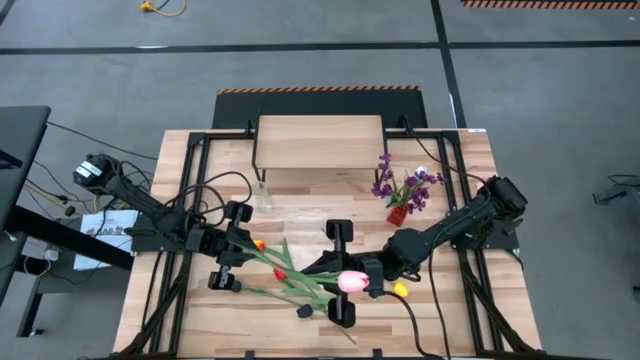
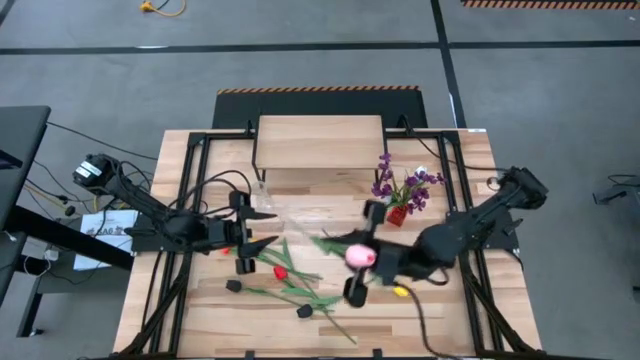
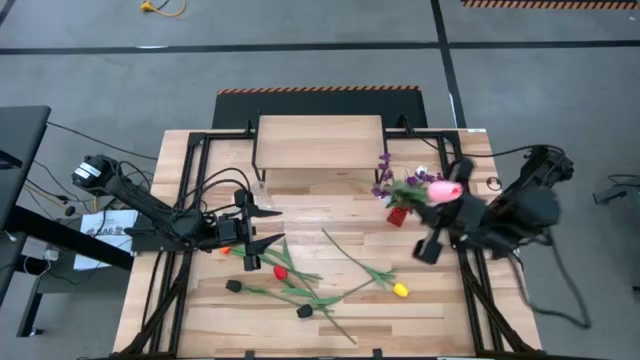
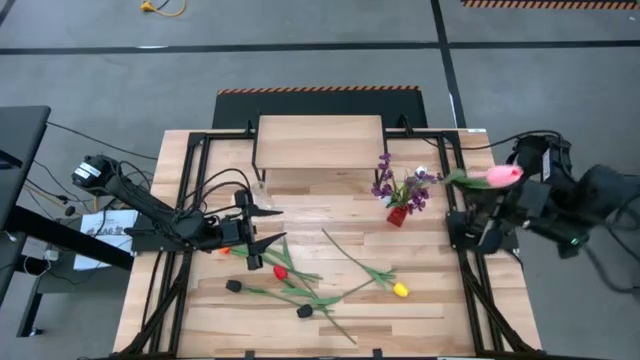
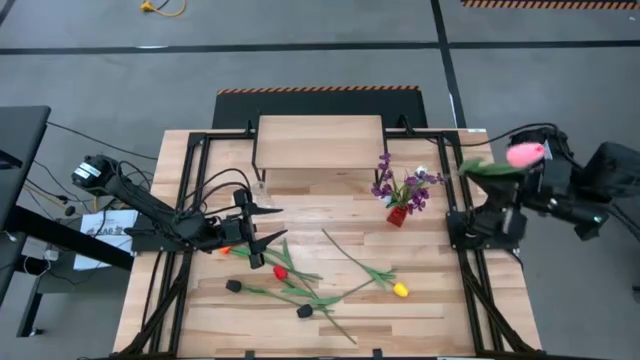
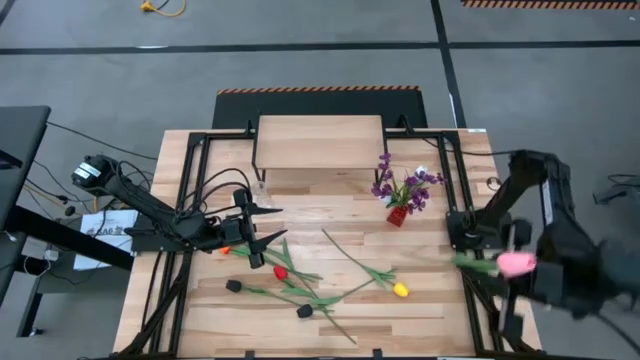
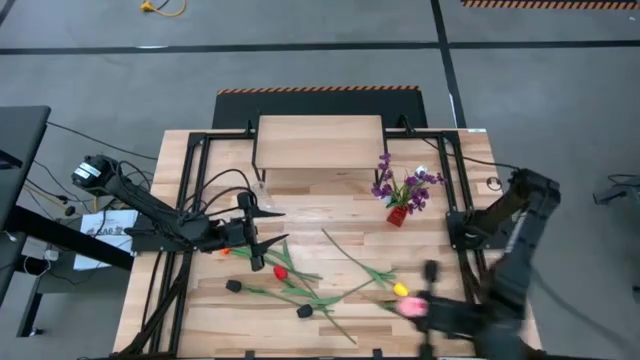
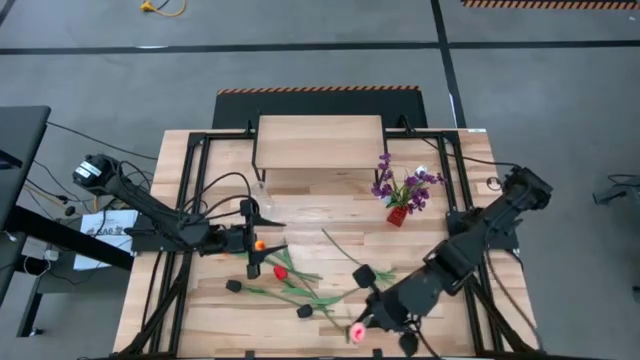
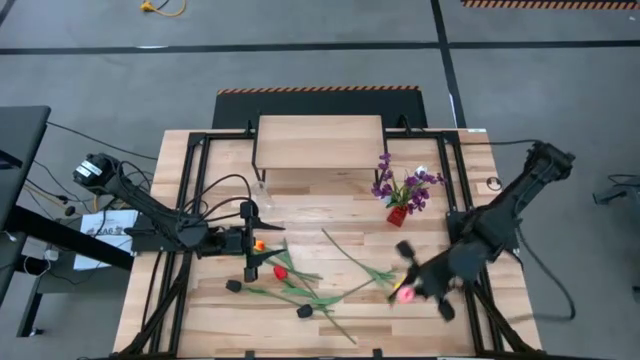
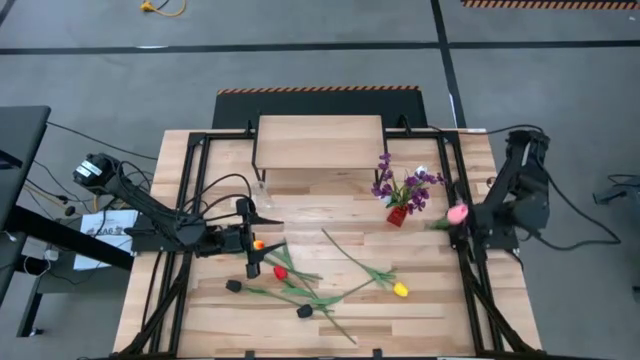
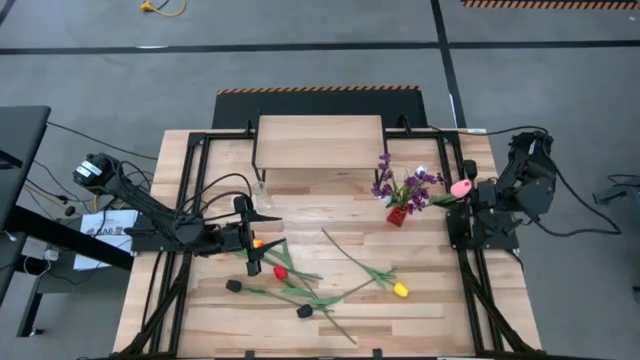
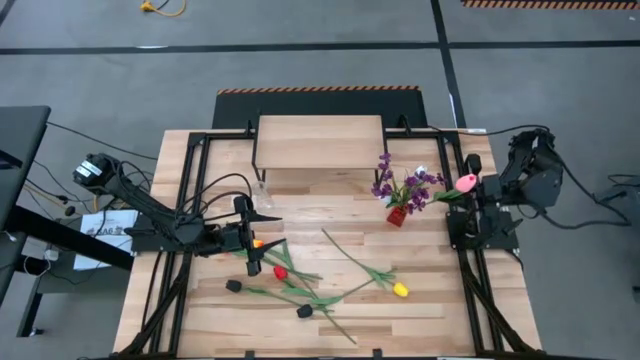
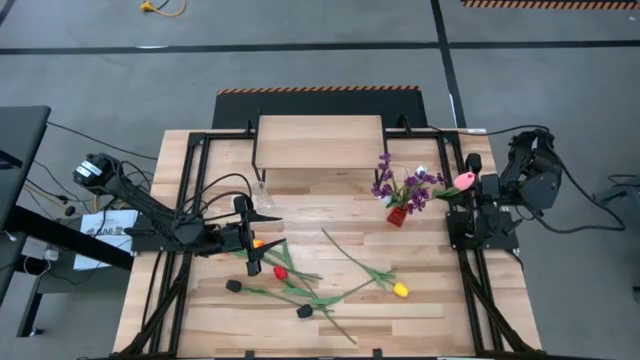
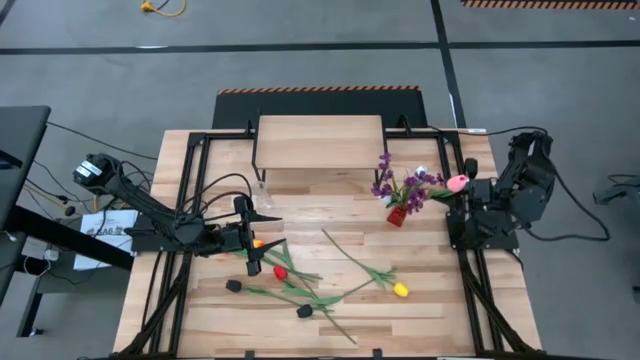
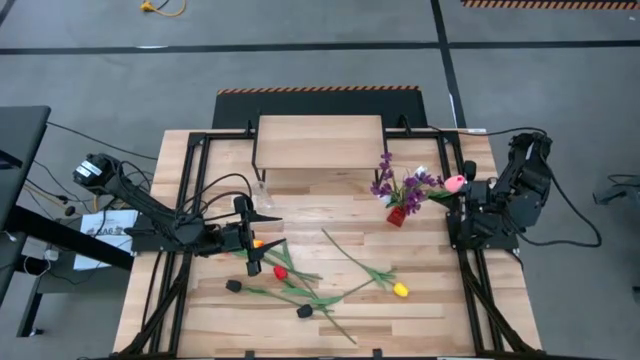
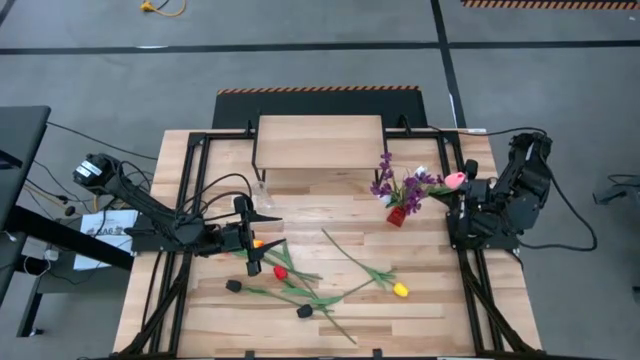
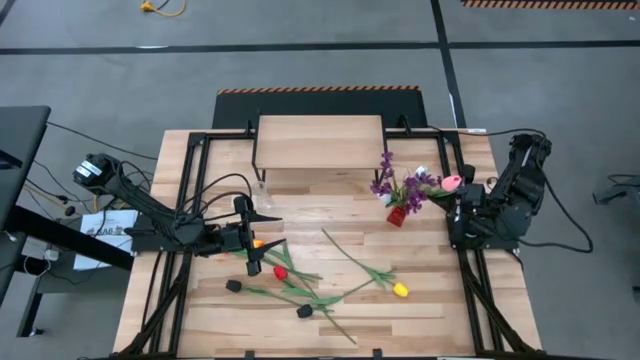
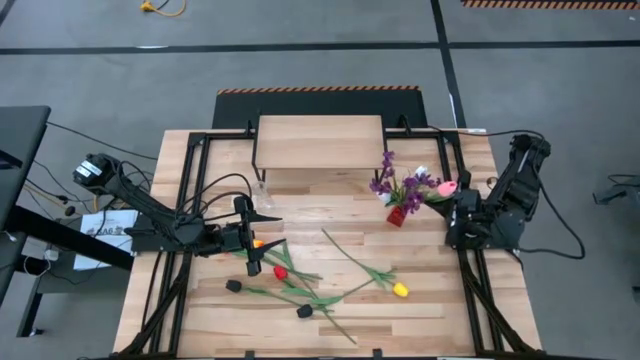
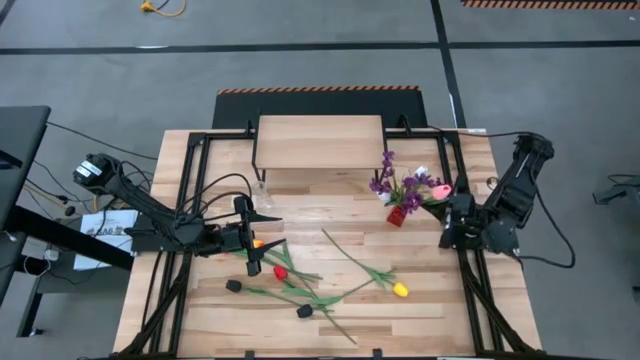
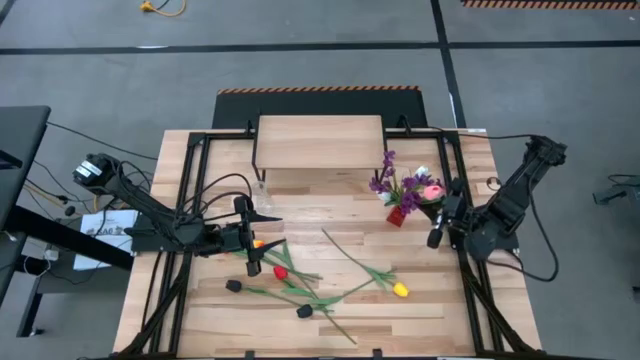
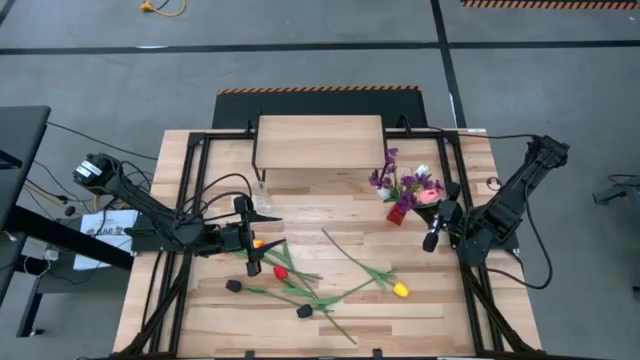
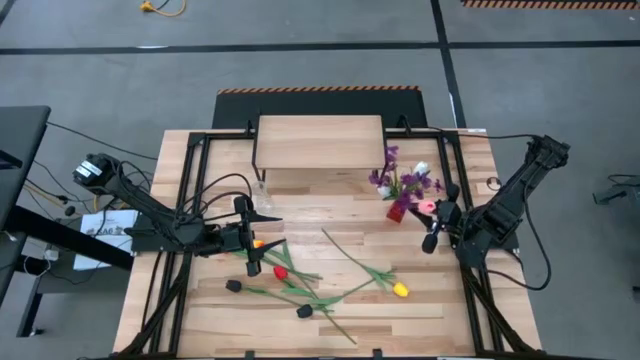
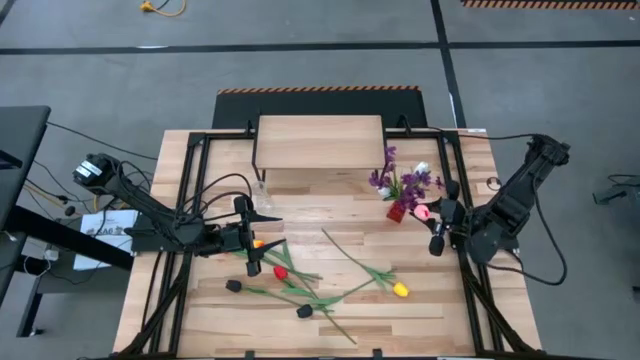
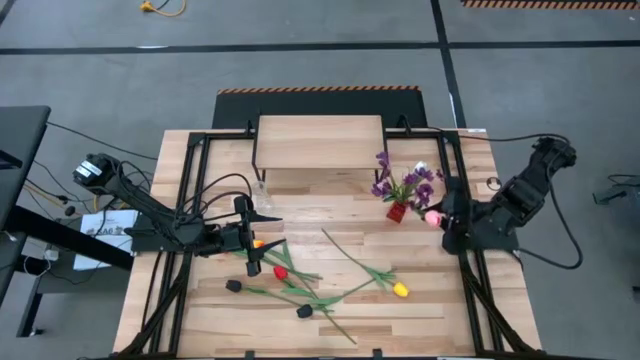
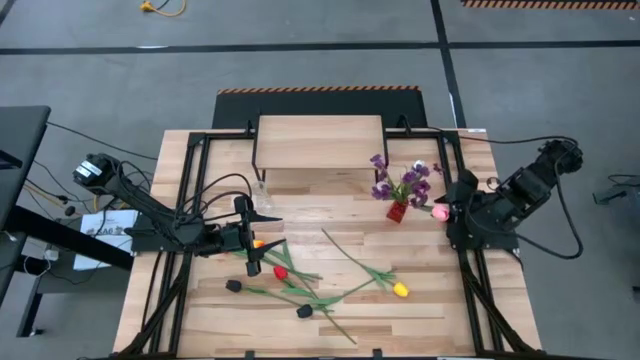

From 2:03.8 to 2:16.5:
Task: Pick and place flowers into a vace then onto a shelf
Put the pink flower into the red vase

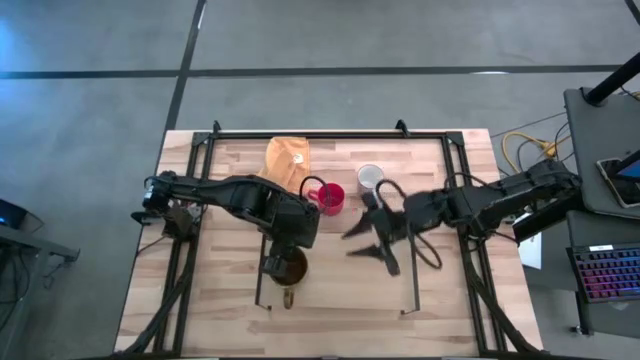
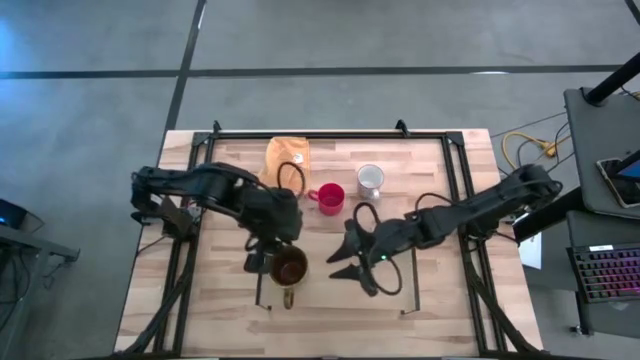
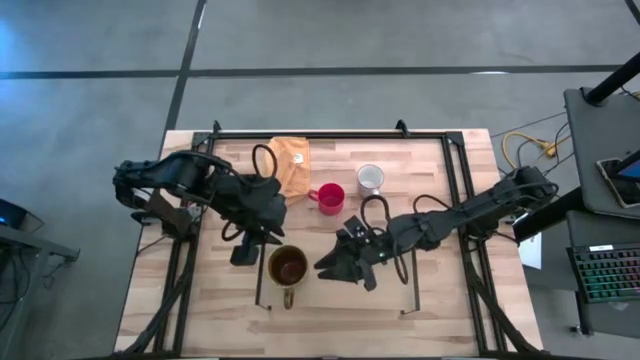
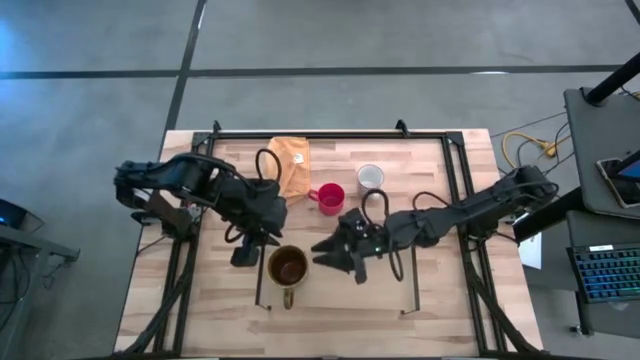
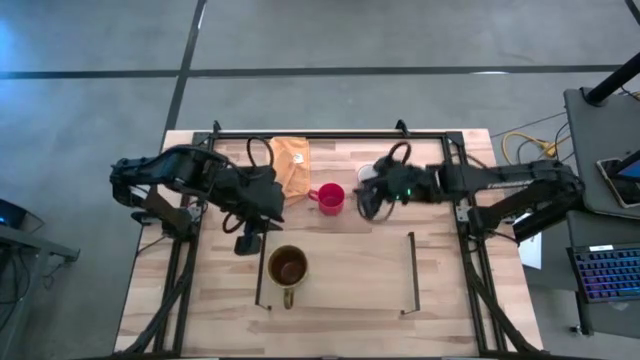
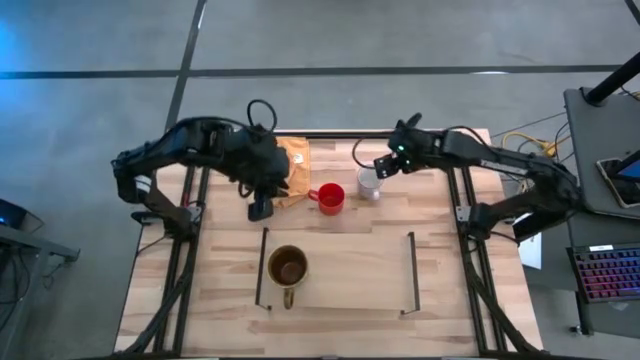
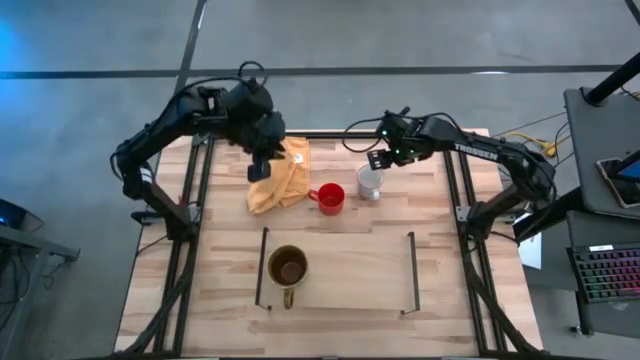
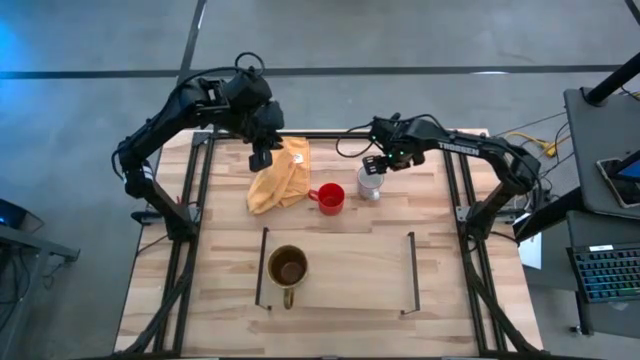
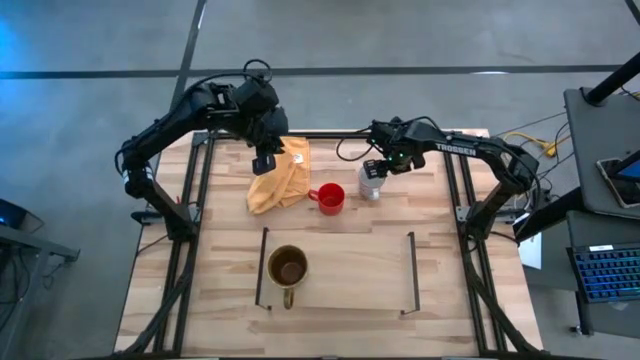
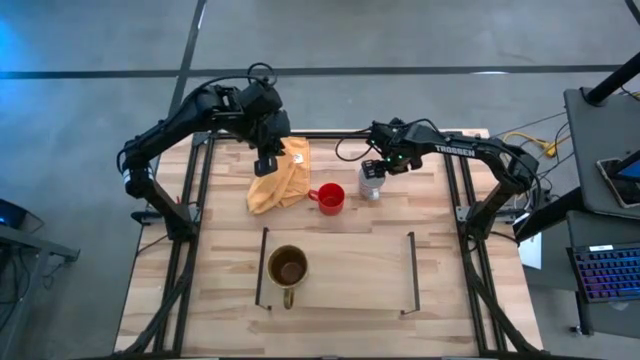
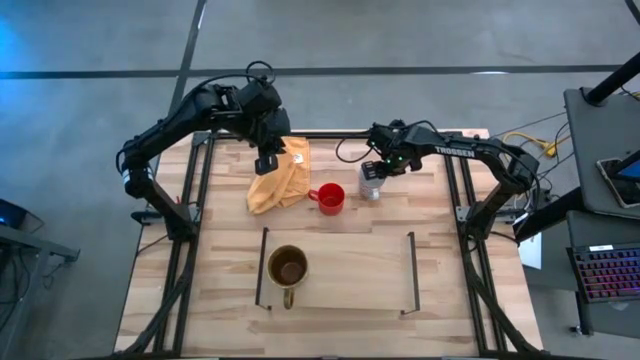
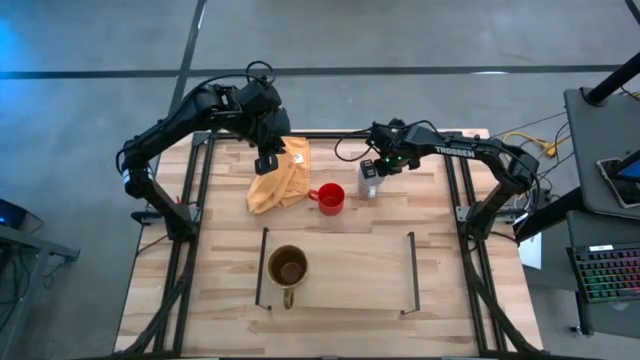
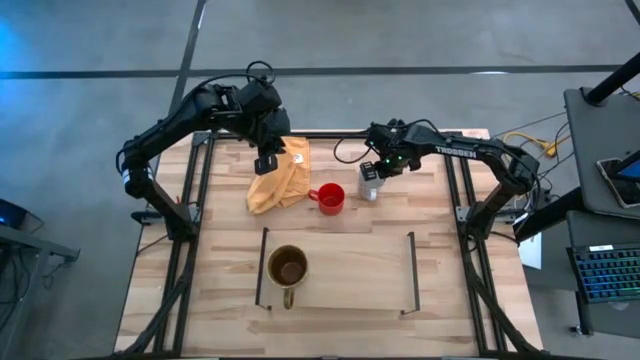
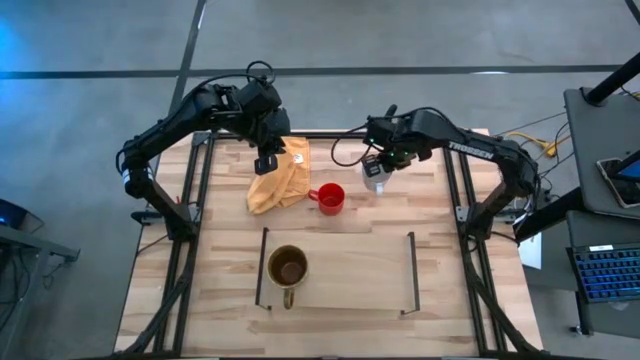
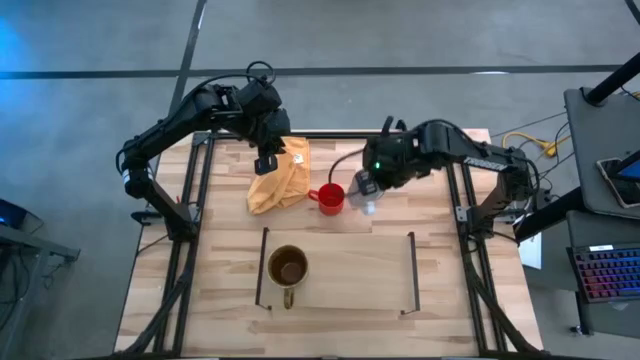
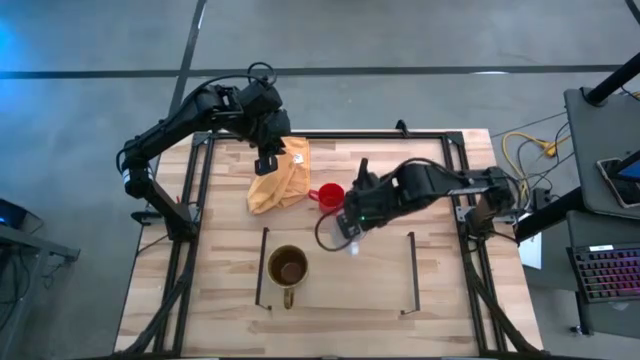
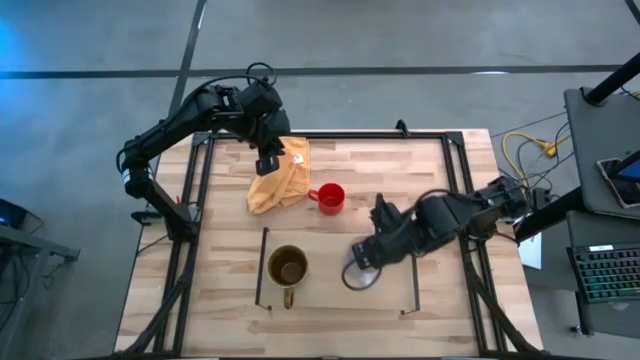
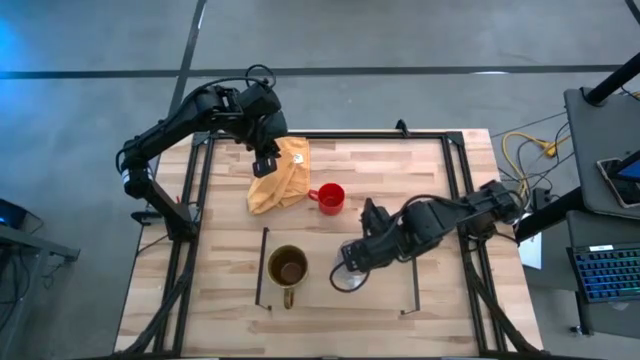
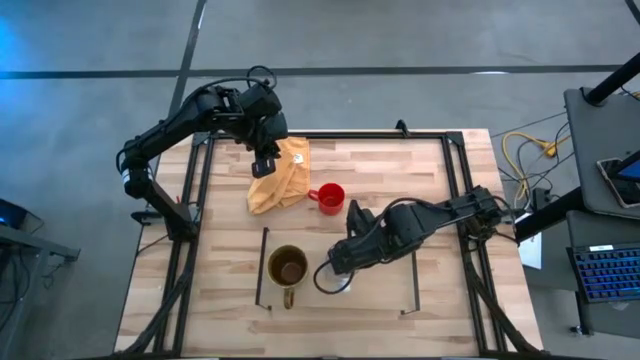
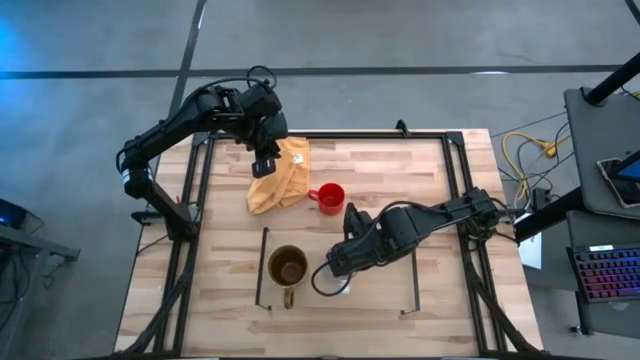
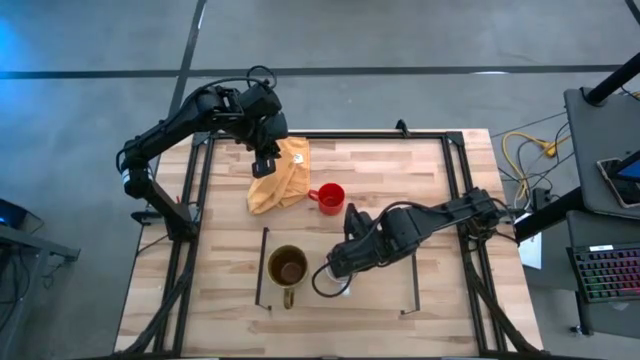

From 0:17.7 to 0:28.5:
Task: Stack small to large cups/mugs on shelf
Put the white mug on the shelf
